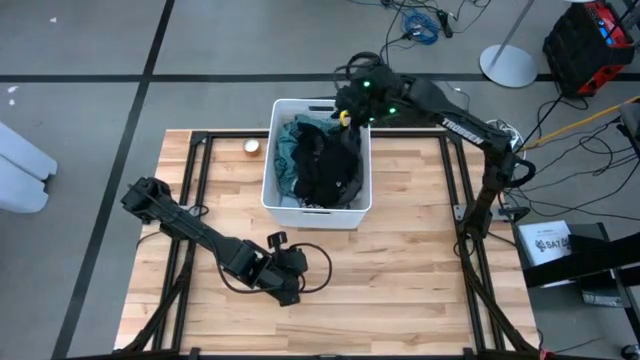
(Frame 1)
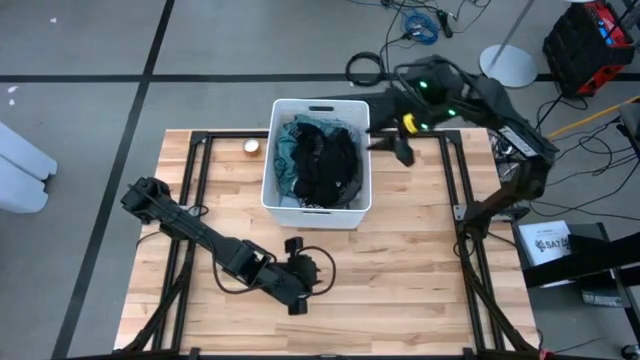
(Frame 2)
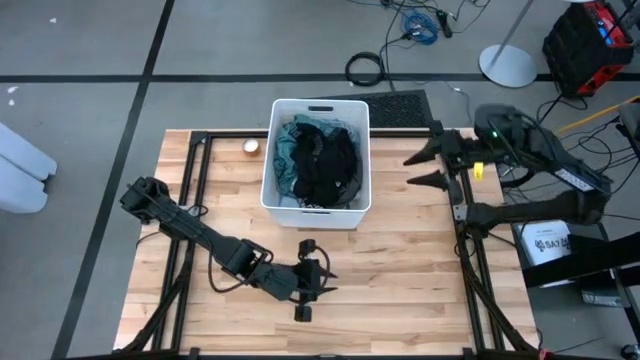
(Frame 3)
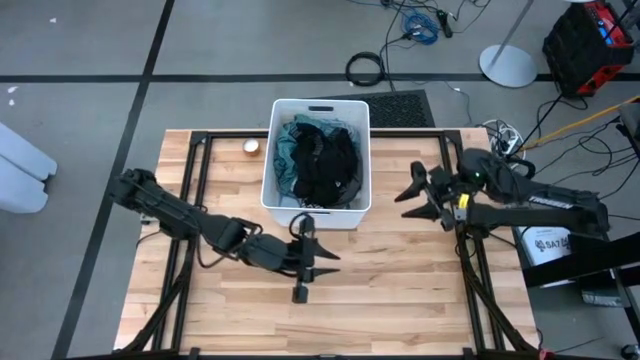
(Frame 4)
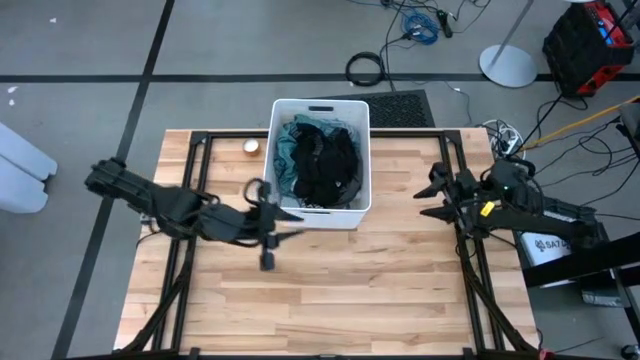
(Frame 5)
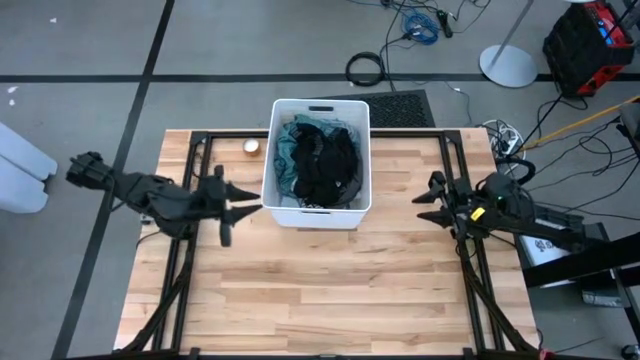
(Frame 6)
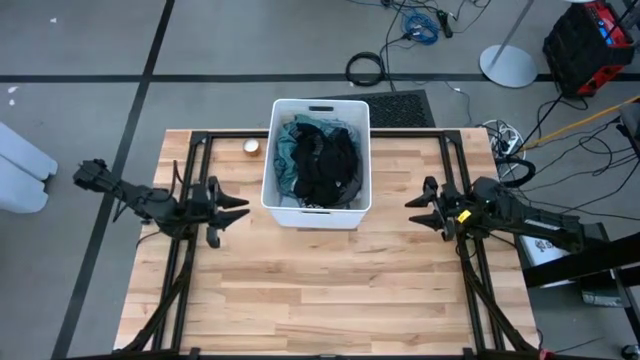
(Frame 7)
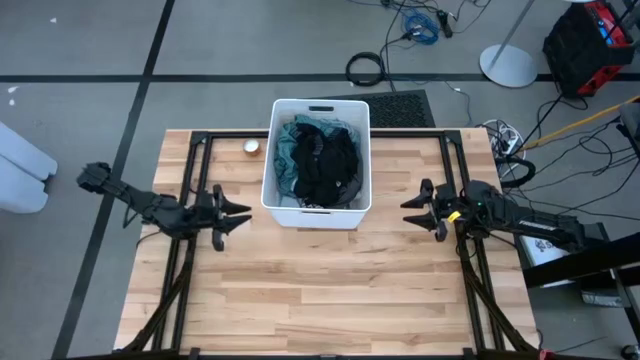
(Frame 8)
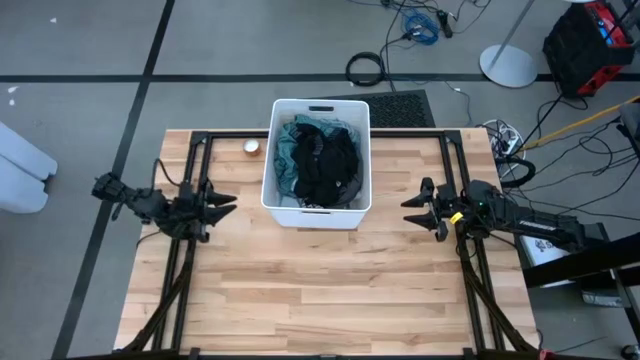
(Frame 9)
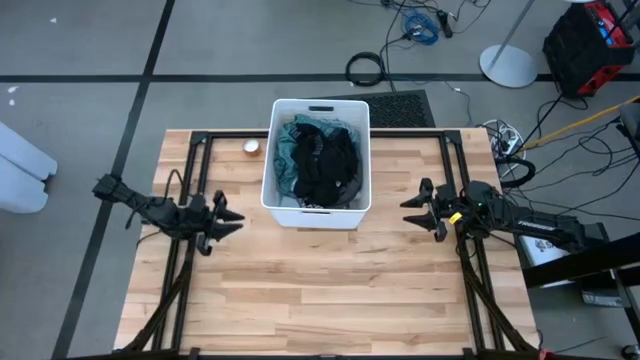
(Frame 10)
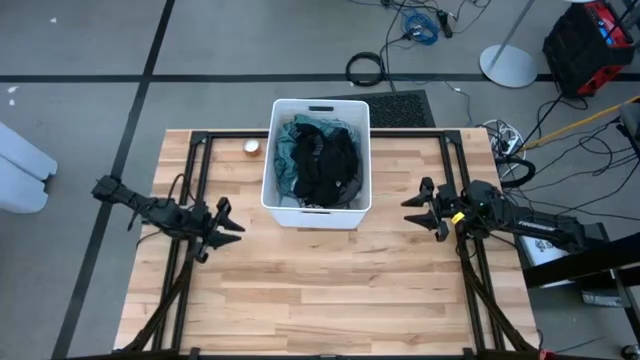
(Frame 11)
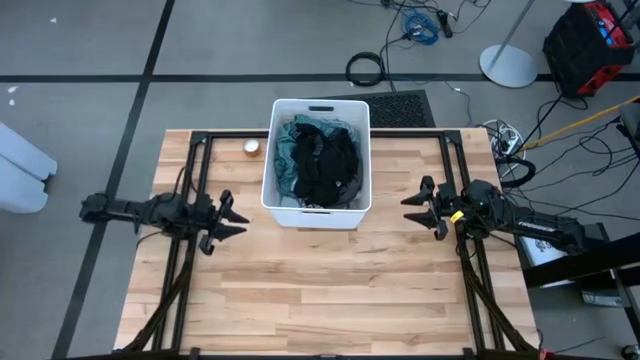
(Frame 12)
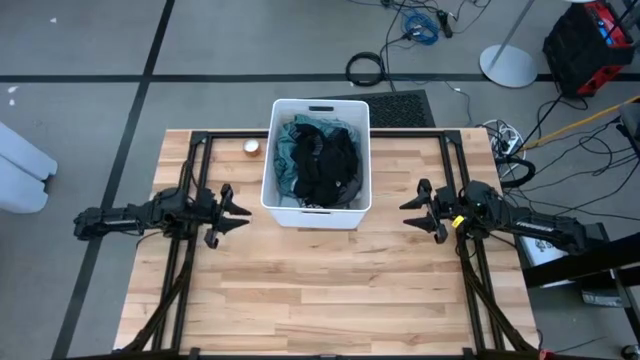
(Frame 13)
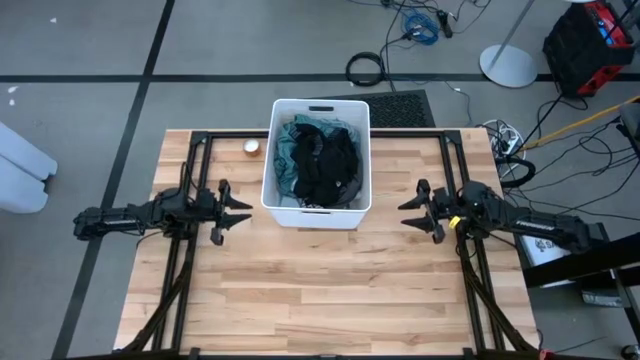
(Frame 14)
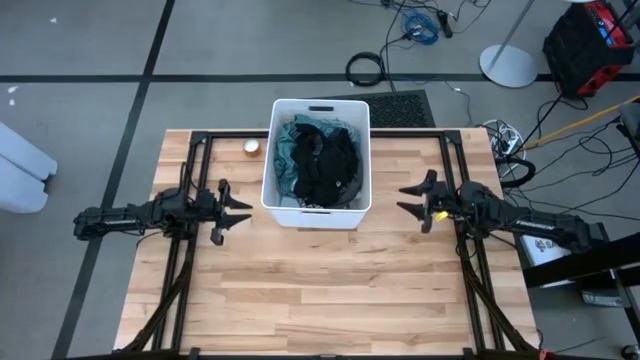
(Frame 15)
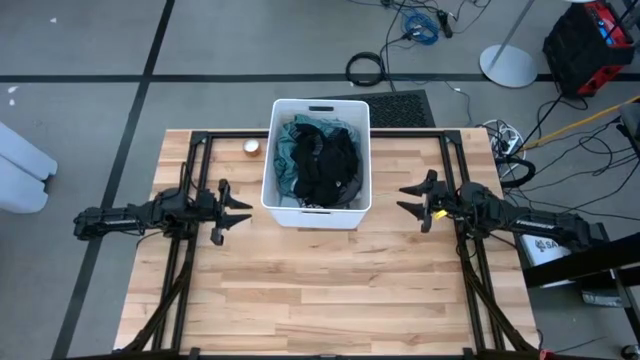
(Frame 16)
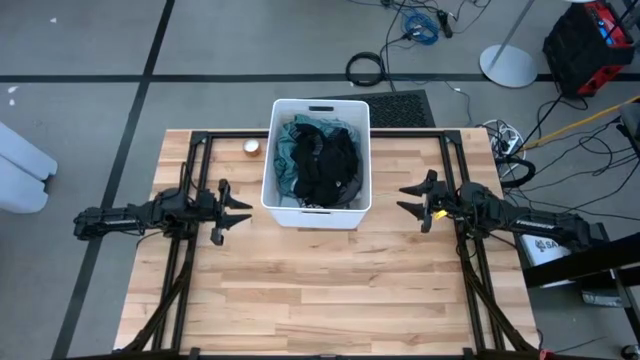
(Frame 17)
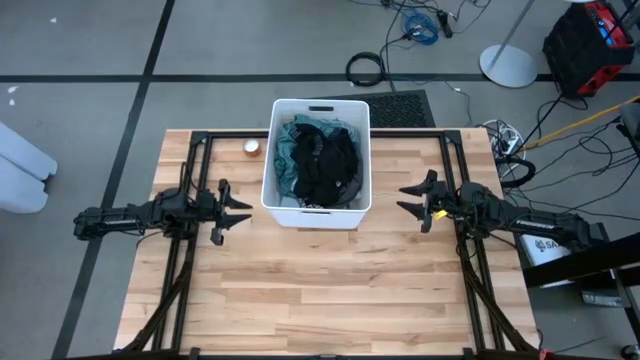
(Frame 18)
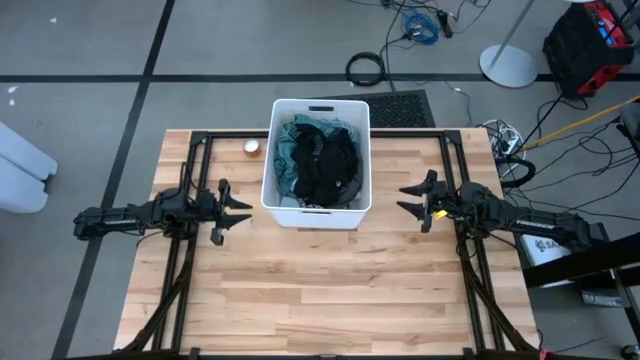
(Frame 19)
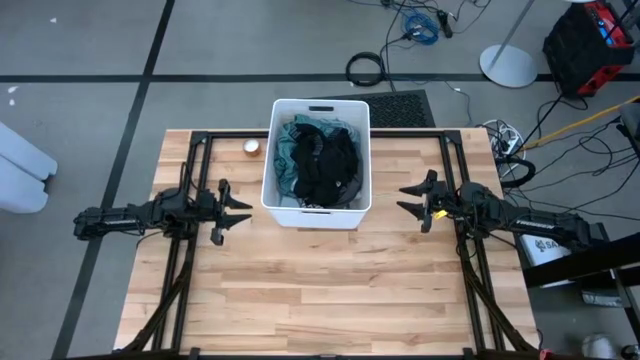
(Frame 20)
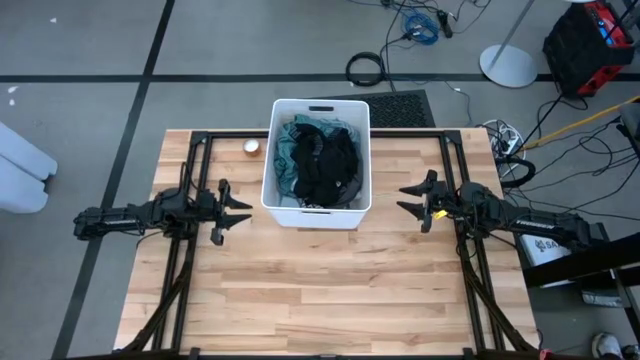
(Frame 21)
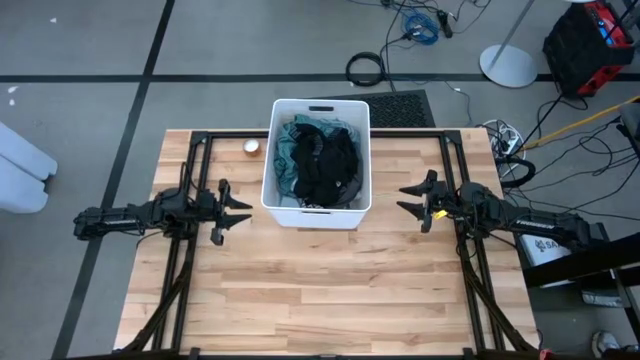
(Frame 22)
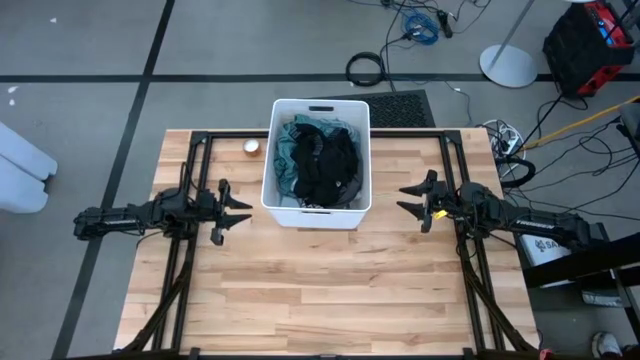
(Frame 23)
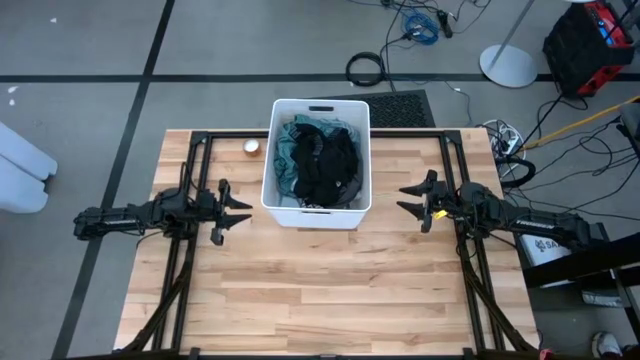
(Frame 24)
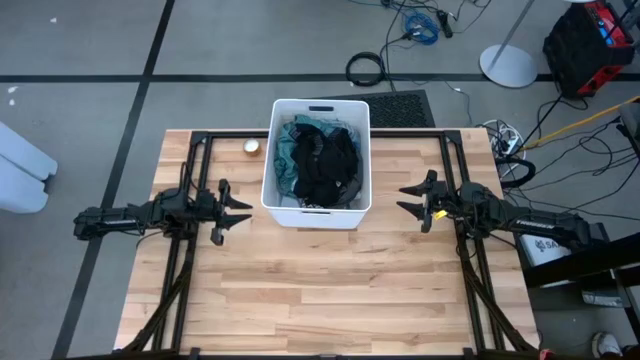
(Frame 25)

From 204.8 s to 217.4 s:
Task: Sort clothes
Return to Home Position

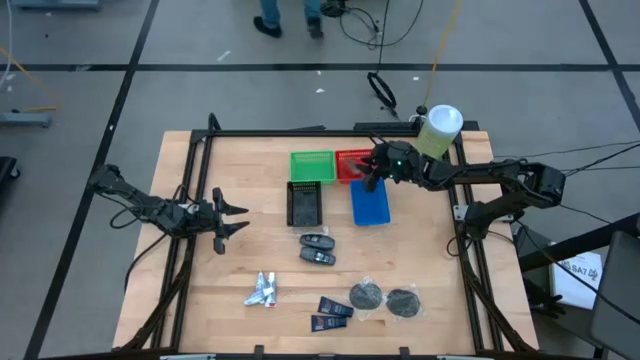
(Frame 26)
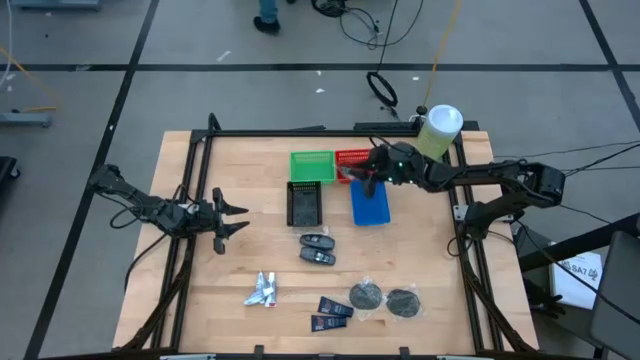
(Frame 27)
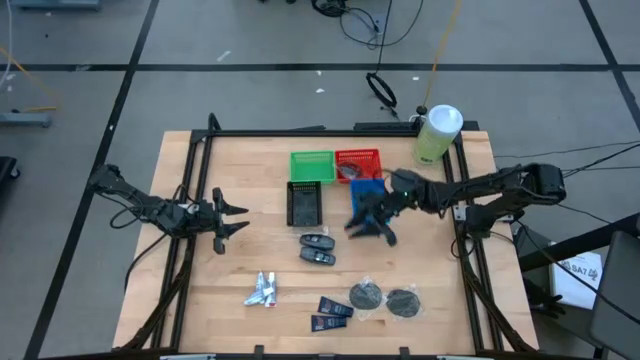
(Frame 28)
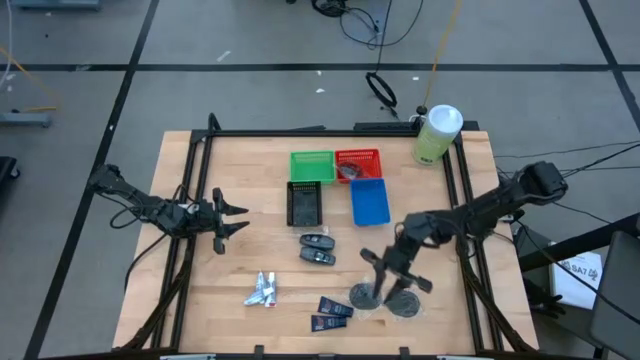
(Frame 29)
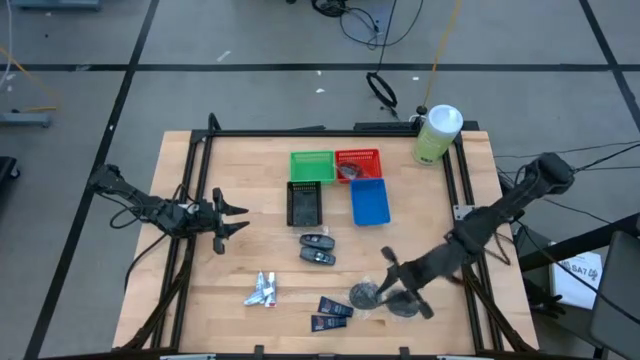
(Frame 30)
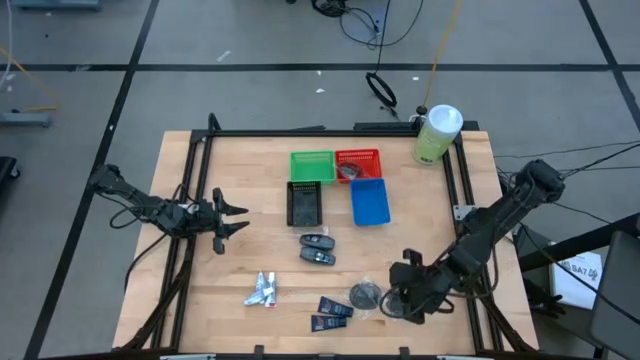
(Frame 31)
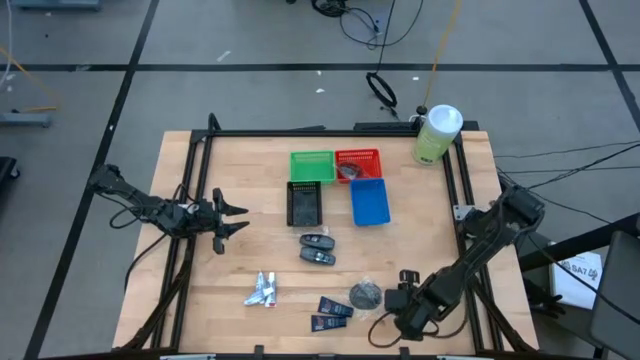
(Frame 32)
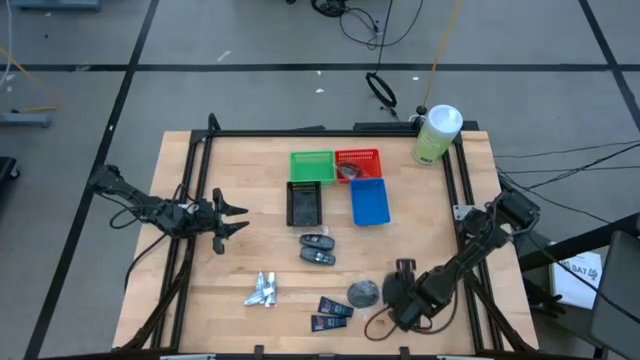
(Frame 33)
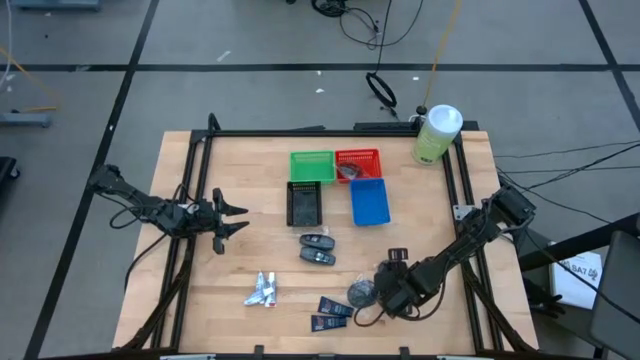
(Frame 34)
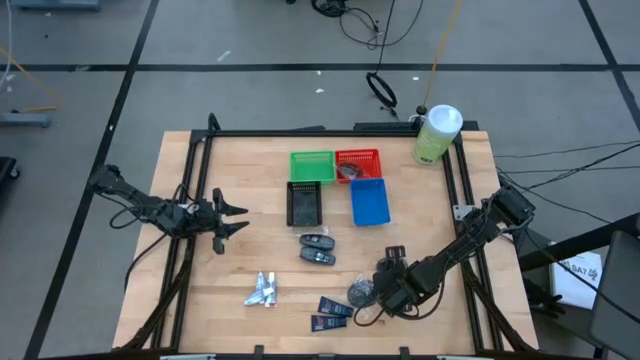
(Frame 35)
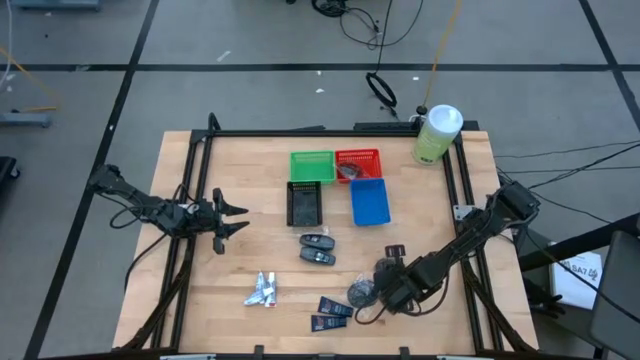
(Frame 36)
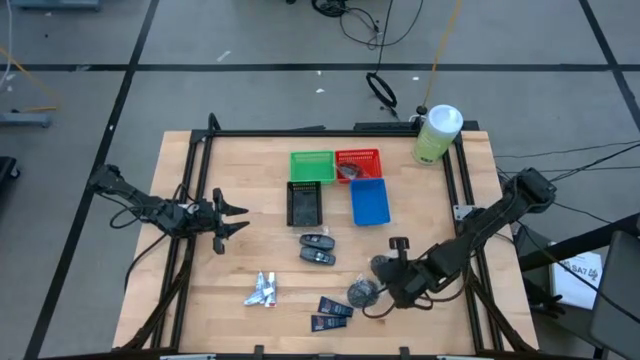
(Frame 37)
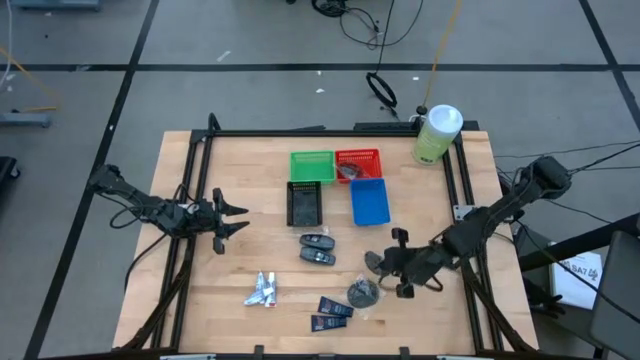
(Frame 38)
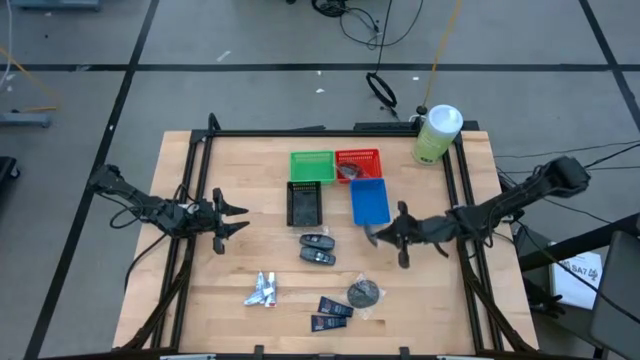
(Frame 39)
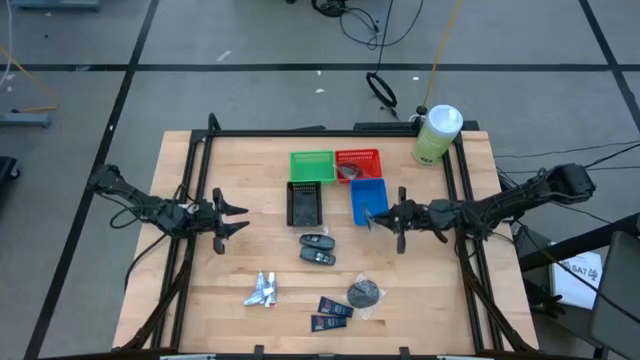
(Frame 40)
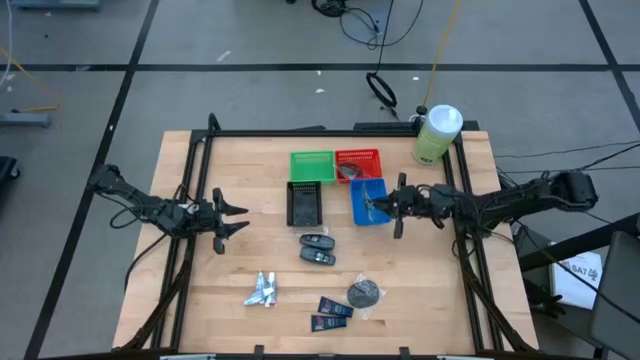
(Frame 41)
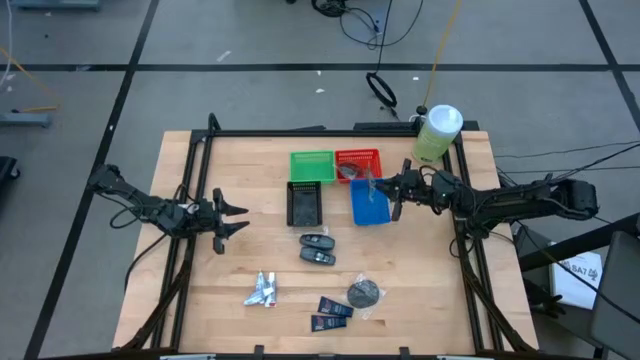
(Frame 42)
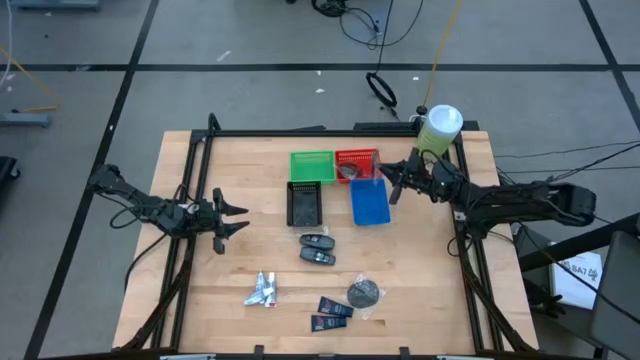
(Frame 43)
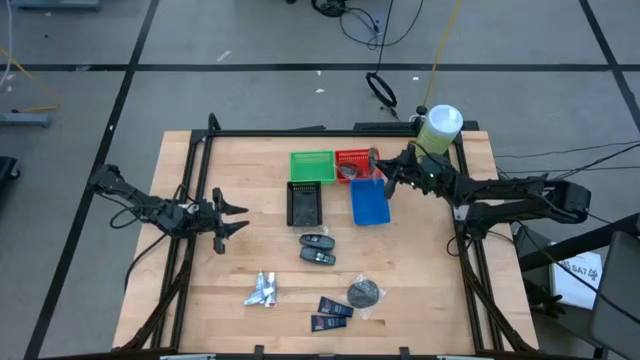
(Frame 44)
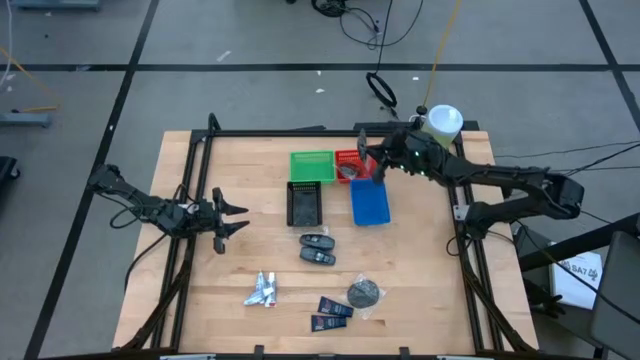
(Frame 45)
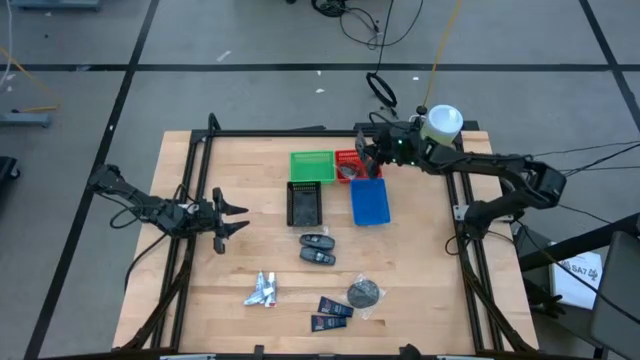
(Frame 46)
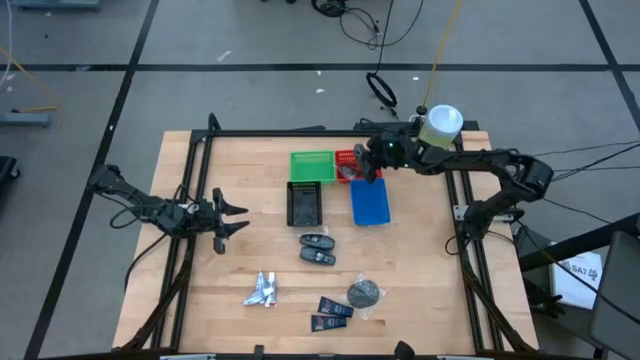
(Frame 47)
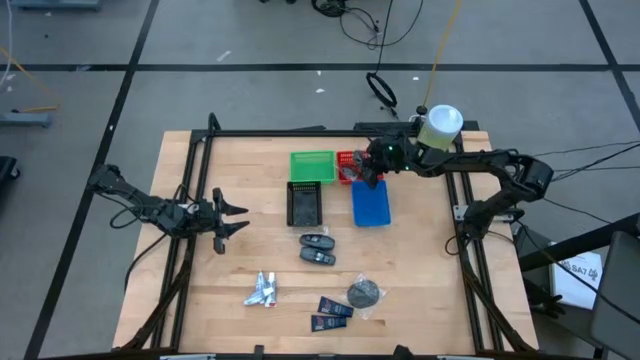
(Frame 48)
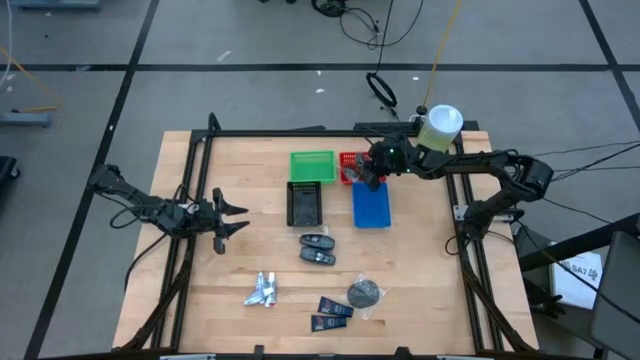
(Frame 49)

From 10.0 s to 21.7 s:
Task: Pick & Place Travel size toiletries
Put the right black hairbrush into the red bin
